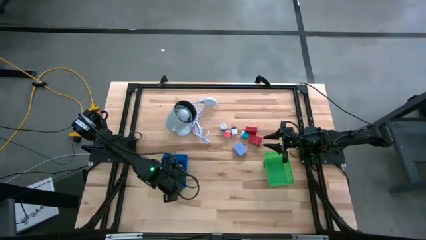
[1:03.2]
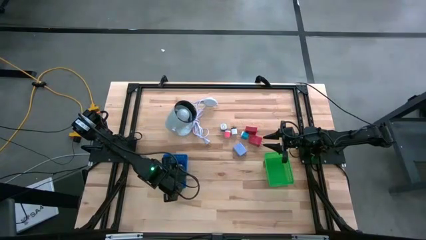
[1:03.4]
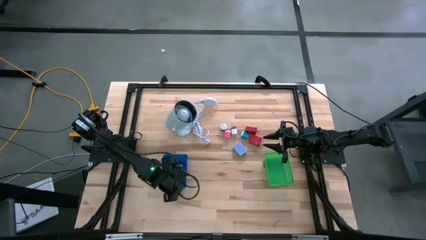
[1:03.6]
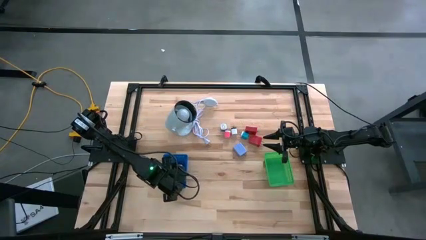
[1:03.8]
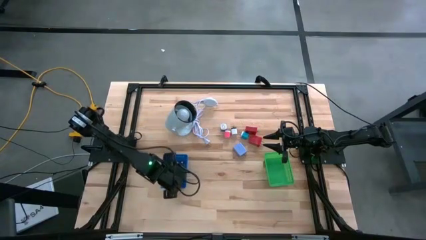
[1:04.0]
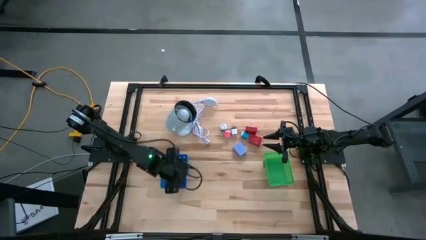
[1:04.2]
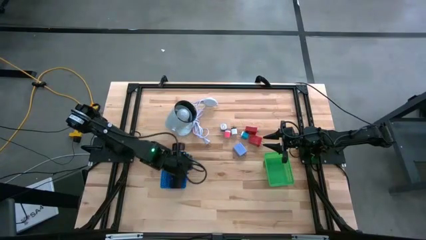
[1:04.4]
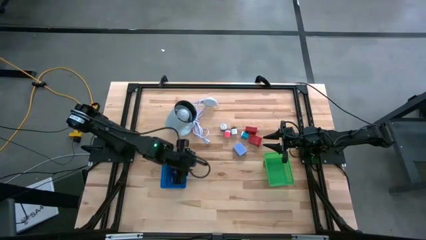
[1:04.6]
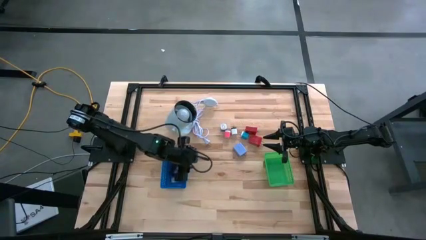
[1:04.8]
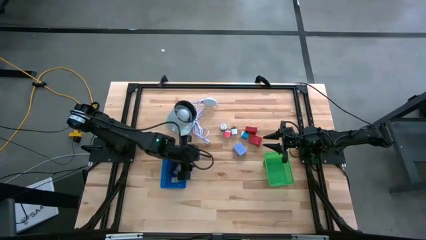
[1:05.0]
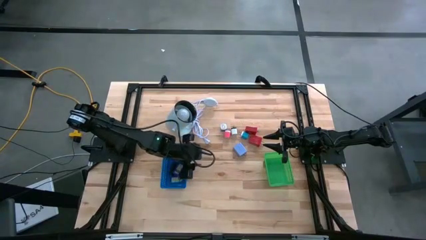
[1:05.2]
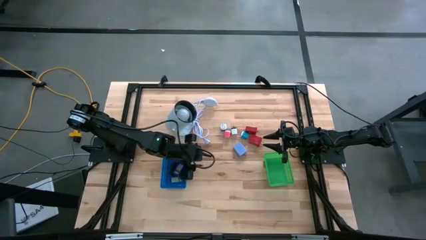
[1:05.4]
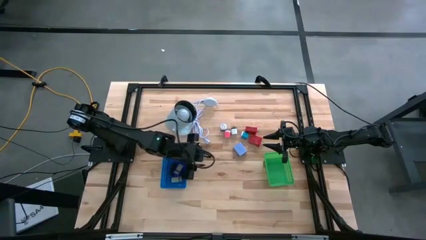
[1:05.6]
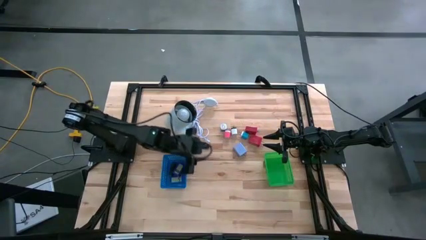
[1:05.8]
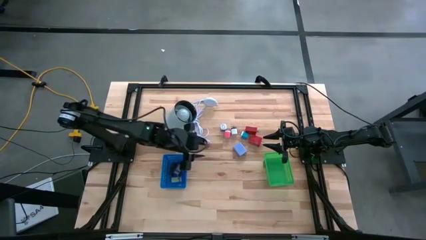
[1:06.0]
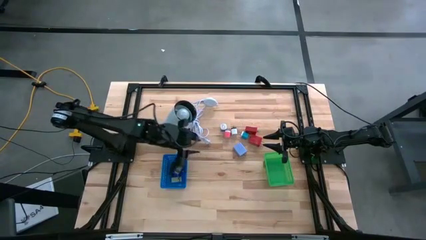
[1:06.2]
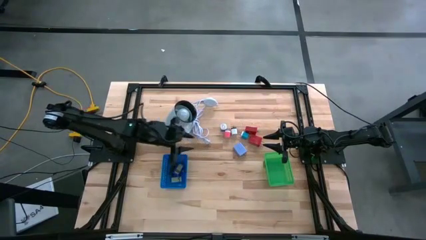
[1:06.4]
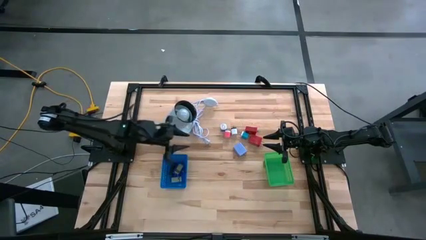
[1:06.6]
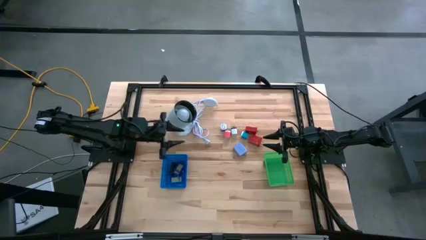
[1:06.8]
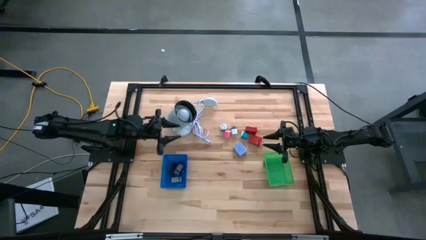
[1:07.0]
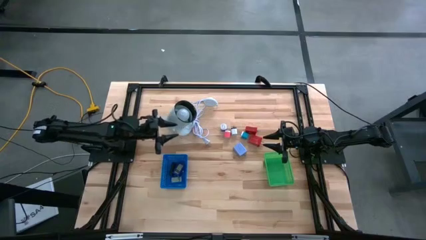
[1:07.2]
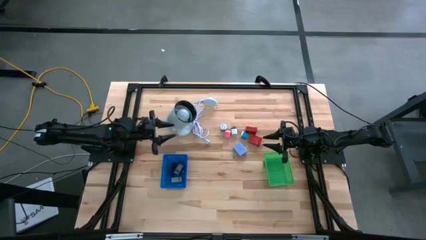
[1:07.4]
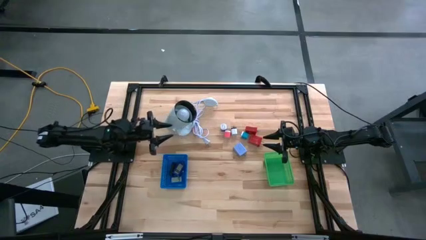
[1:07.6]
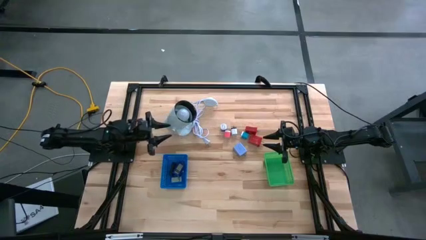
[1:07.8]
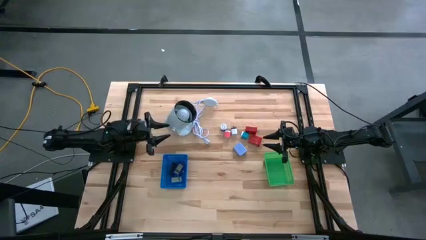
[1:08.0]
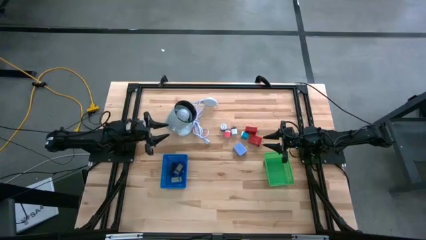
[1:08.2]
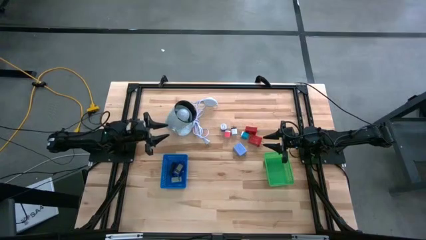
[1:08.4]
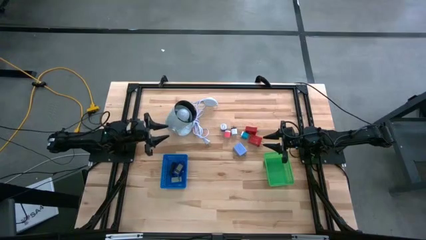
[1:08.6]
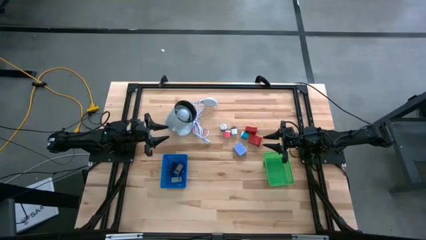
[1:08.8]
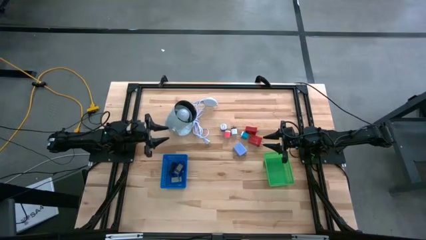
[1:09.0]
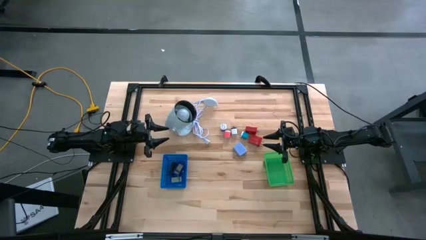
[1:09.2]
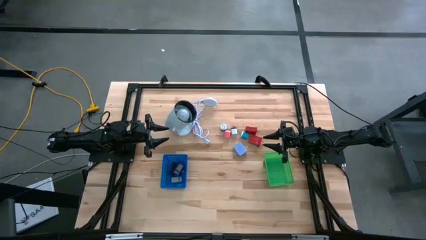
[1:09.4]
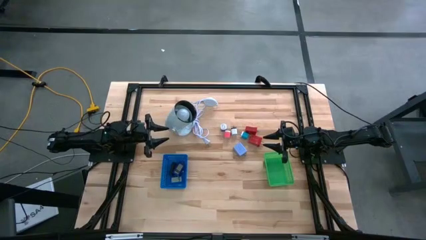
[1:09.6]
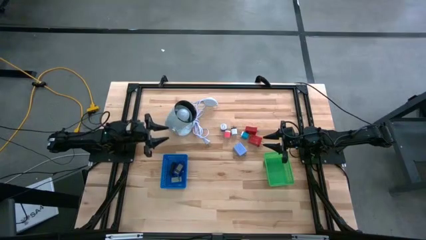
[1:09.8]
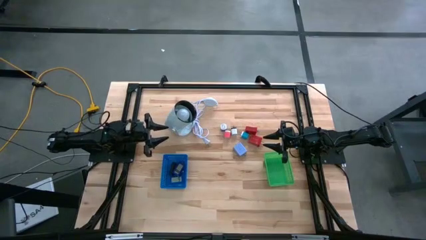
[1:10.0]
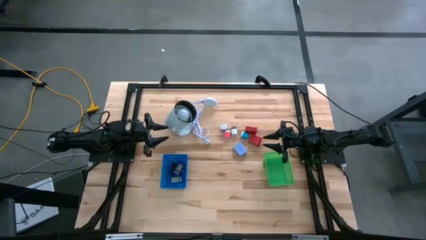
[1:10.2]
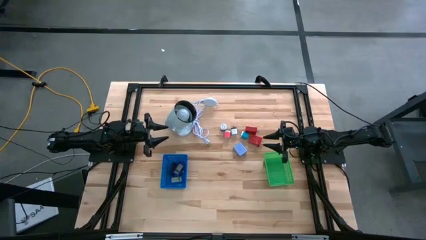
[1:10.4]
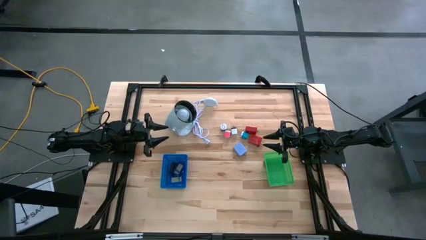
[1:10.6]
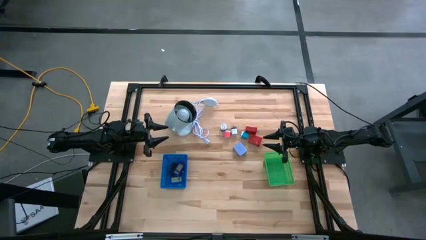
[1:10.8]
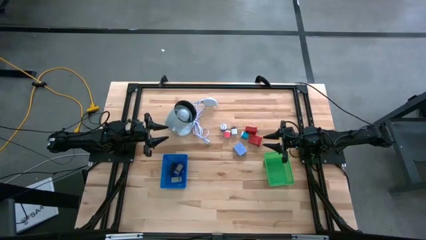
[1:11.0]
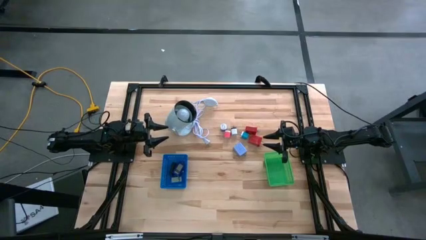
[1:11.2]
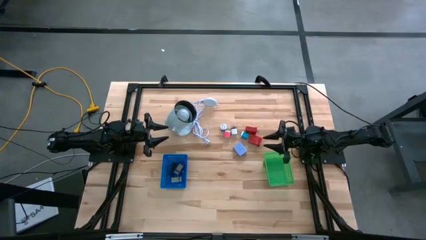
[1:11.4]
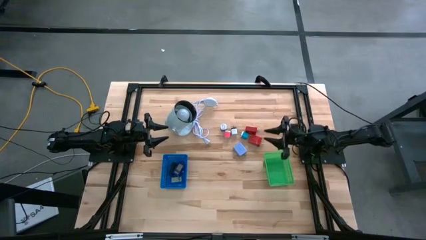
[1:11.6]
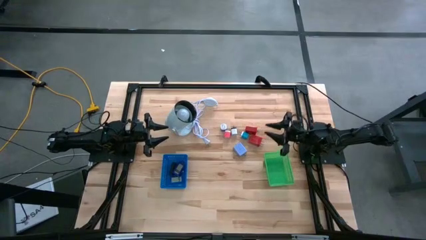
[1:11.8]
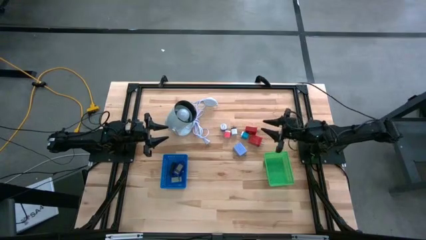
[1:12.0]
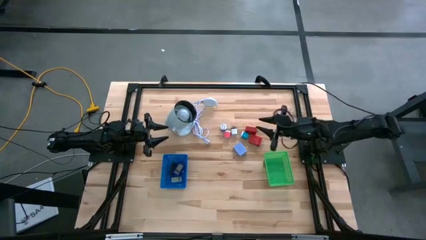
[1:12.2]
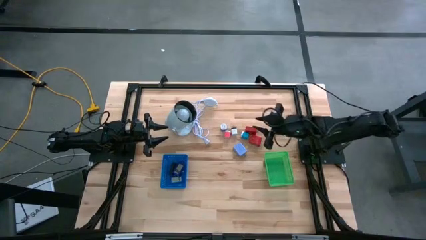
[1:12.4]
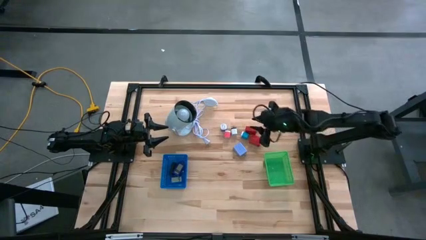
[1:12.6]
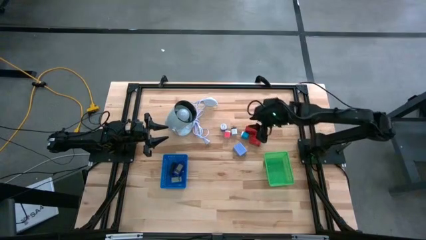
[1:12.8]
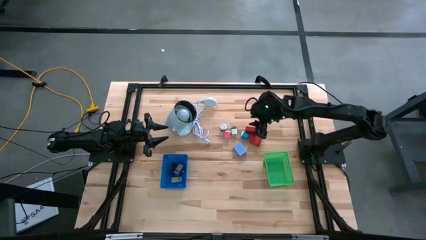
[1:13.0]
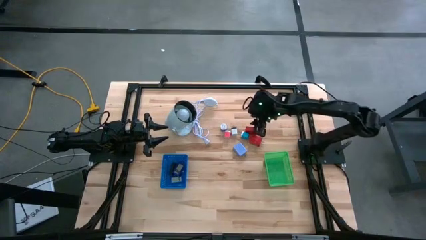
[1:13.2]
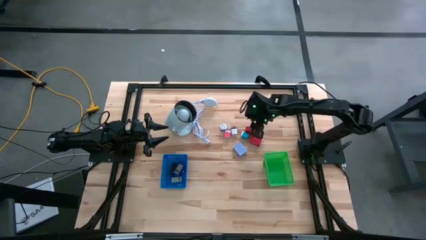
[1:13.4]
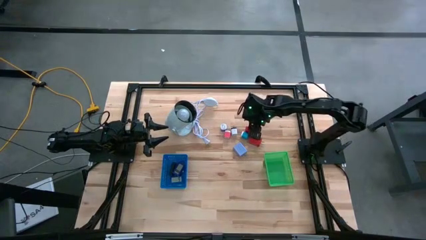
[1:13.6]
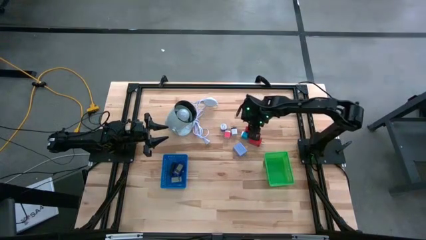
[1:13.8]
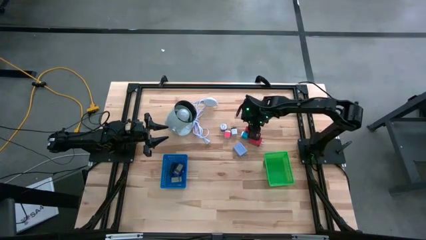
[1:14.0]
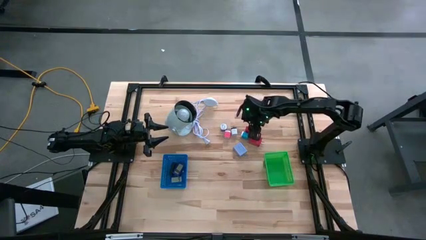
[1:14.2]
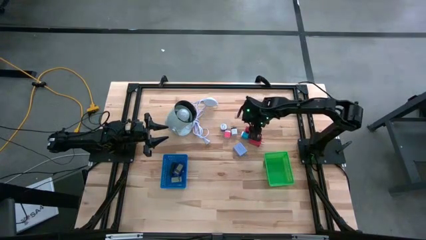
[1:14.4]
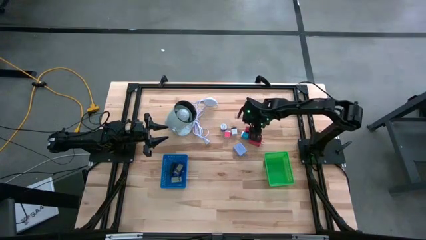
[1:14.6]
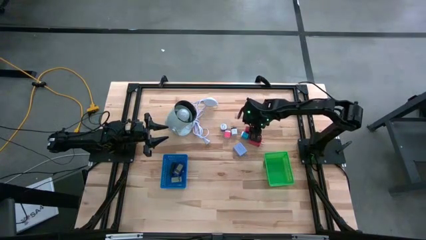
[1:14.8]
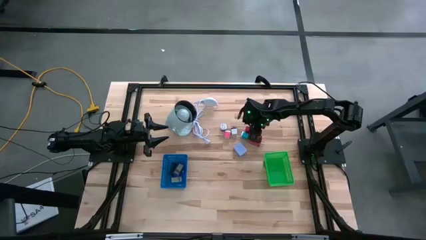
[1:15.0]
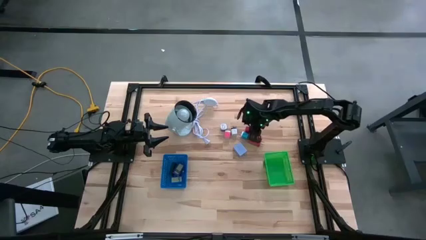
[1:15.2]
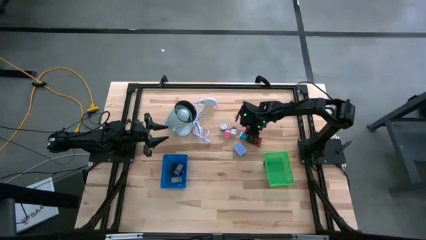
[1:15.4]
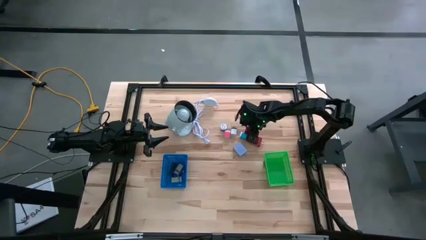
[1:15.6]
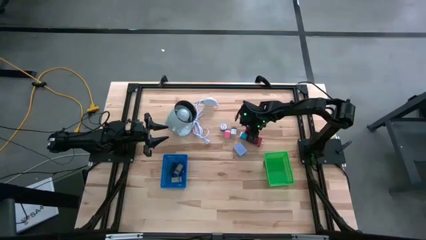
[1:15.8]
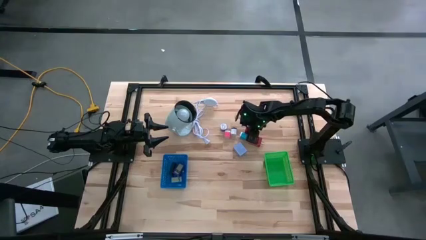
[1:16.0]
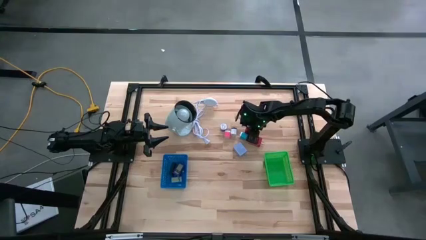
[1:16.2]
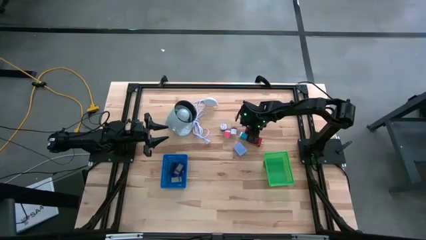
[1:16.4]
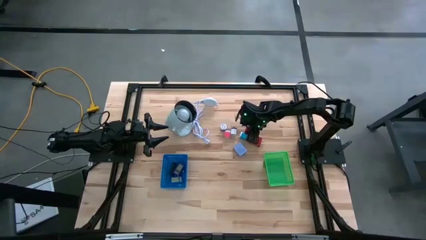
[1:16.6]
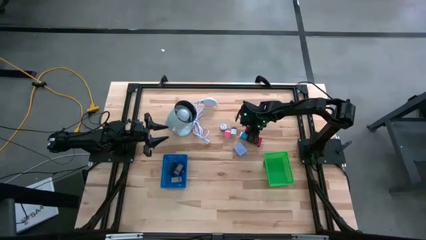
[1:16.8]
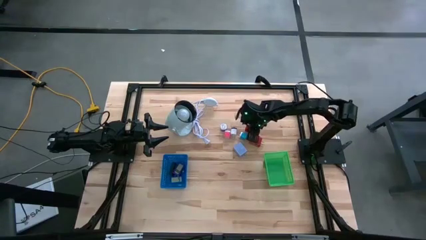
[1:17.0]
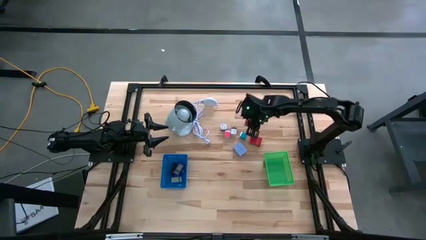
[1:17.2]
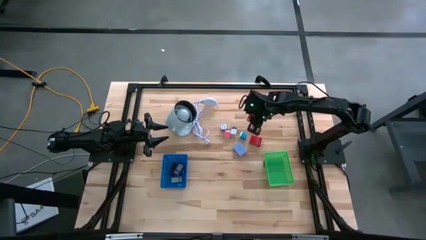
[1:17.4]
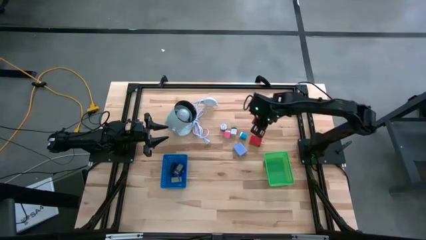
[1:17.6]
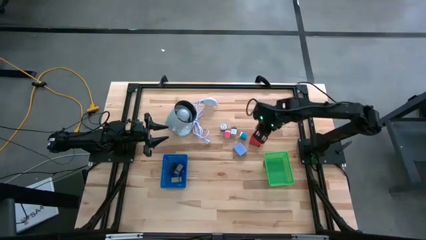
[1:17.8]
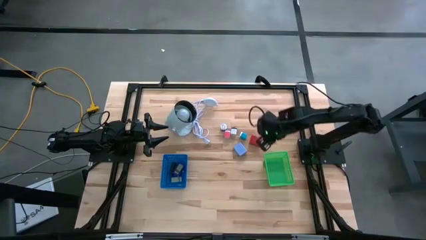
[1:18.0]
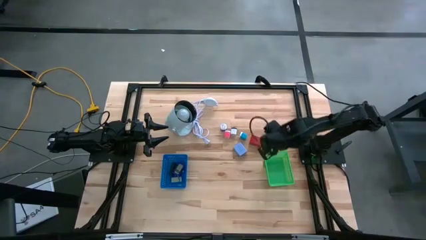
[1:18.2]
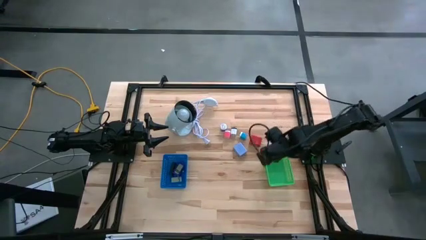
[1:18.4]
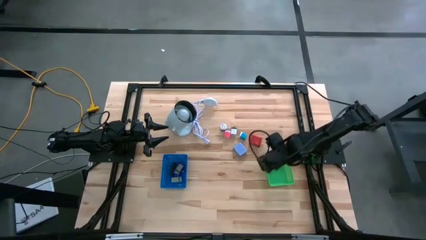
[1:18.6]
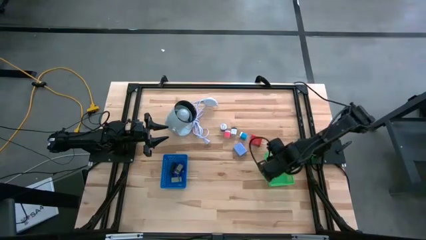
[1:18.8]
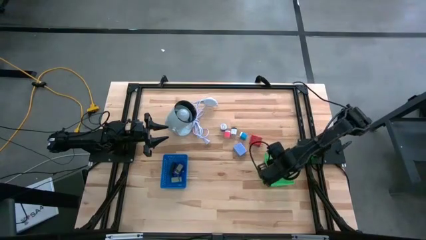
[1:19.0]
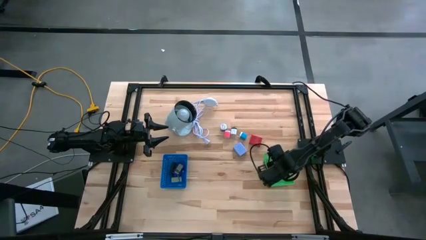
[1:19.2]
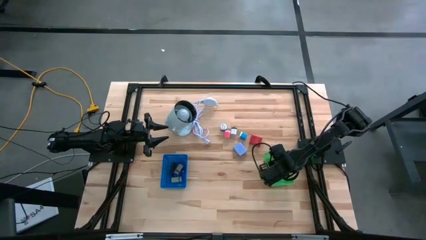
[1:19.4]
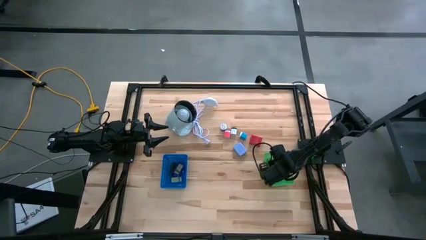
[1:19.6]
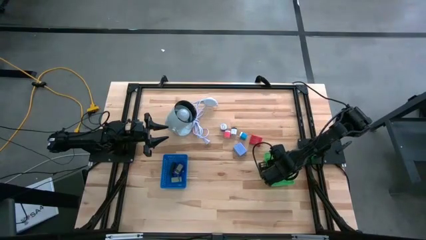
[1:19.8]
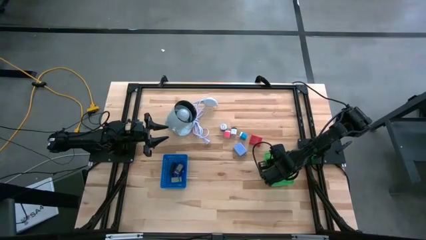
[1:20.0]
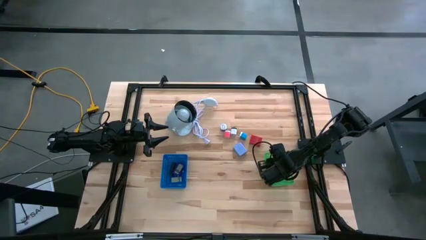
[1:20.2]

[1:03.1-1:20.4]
Task: Pick & Place Office items
Put the top red charger adapter into the green bin
